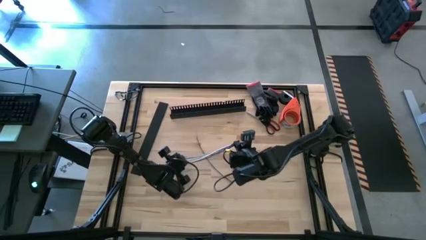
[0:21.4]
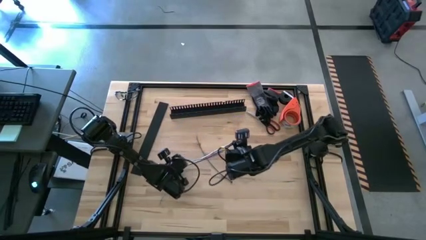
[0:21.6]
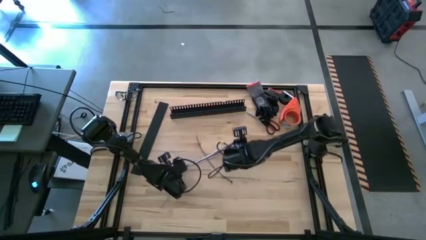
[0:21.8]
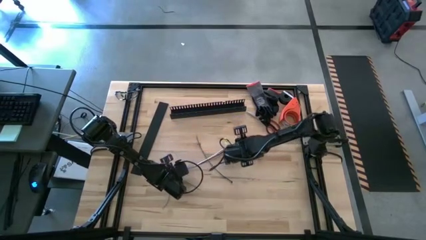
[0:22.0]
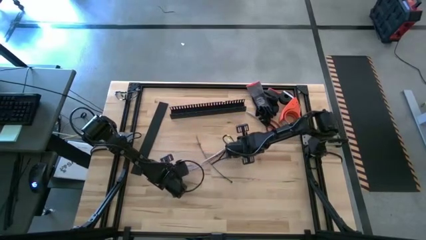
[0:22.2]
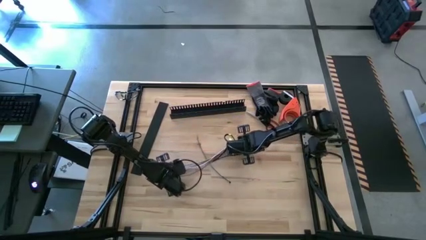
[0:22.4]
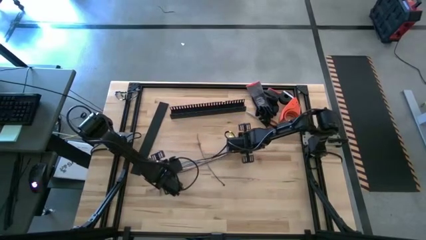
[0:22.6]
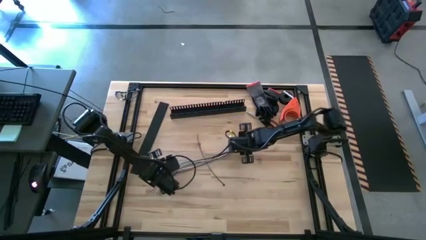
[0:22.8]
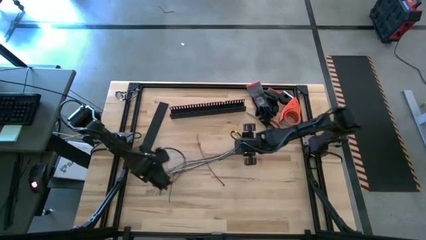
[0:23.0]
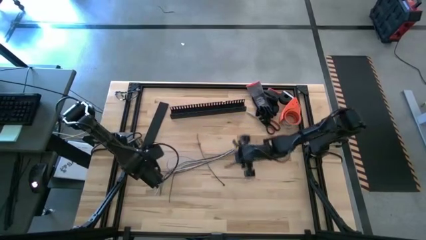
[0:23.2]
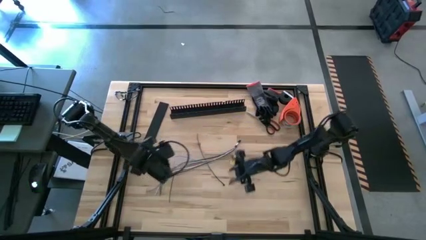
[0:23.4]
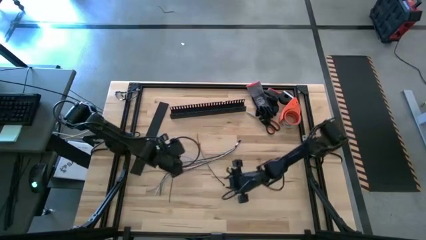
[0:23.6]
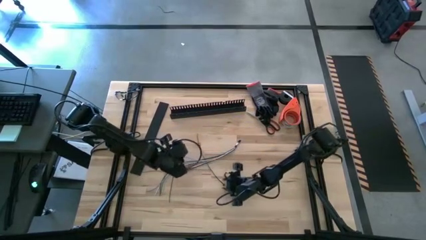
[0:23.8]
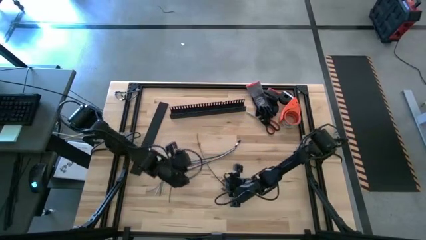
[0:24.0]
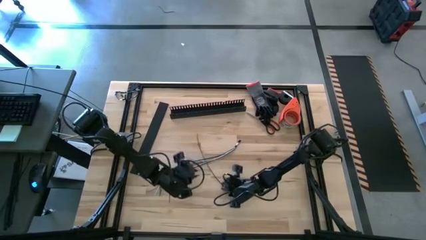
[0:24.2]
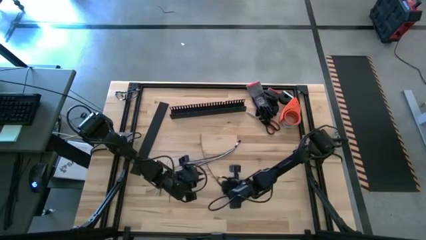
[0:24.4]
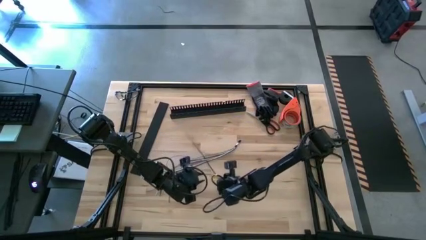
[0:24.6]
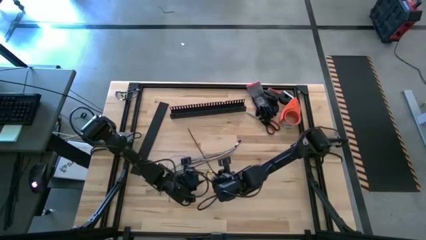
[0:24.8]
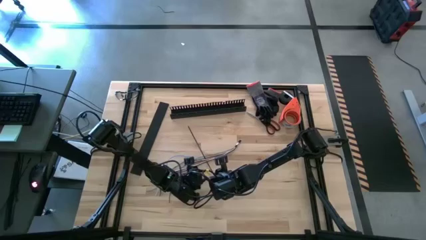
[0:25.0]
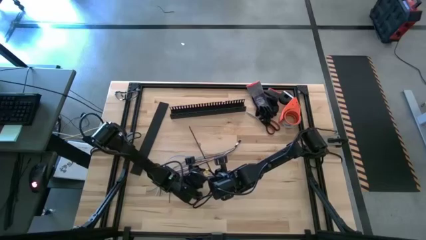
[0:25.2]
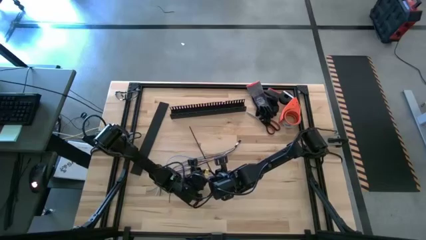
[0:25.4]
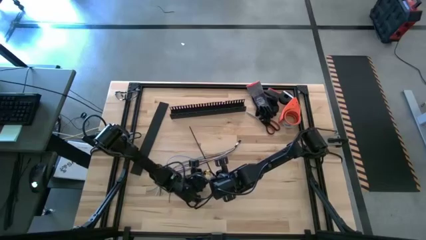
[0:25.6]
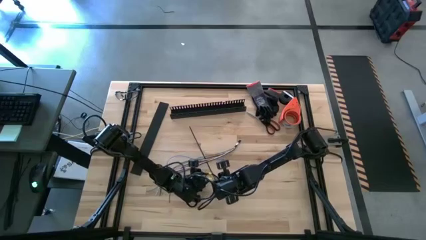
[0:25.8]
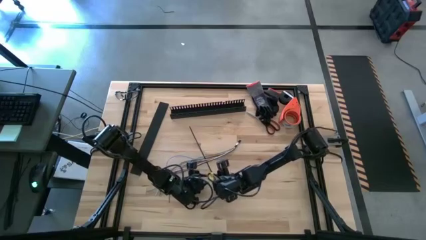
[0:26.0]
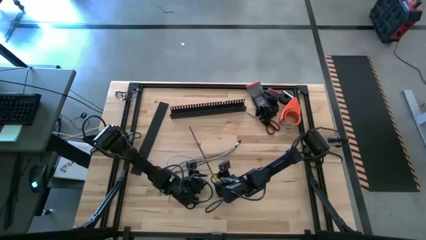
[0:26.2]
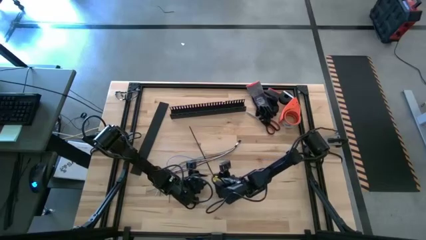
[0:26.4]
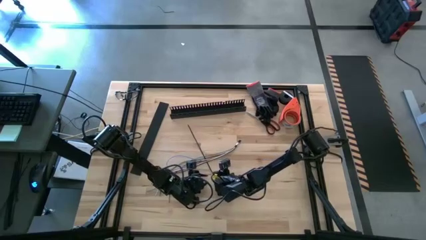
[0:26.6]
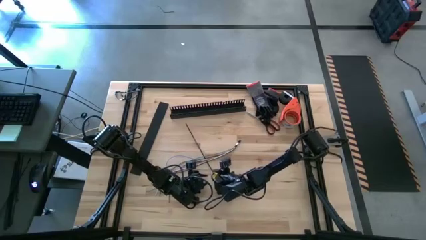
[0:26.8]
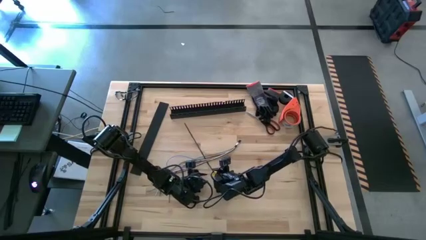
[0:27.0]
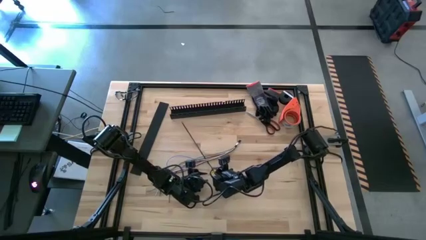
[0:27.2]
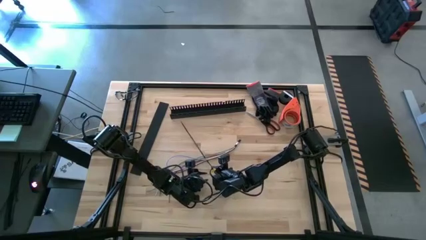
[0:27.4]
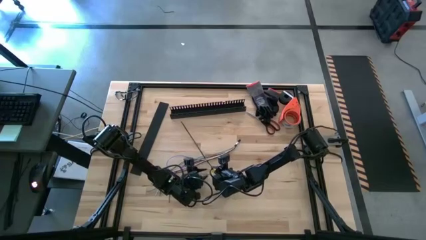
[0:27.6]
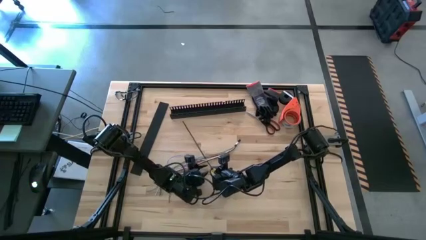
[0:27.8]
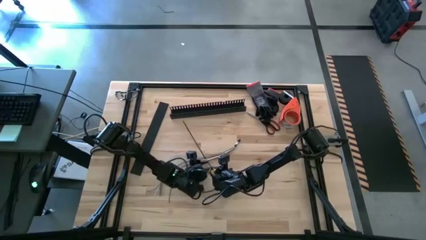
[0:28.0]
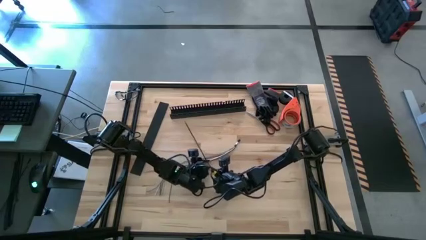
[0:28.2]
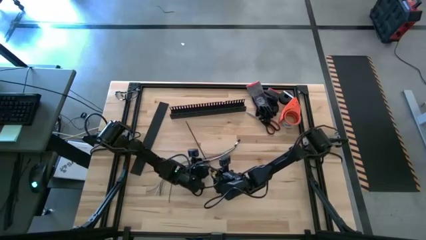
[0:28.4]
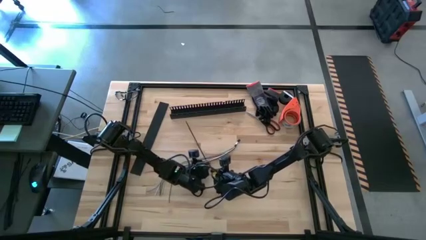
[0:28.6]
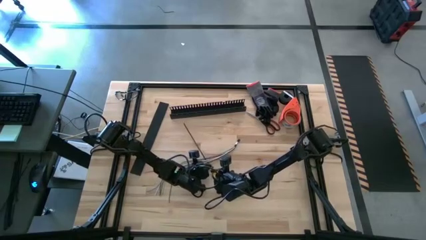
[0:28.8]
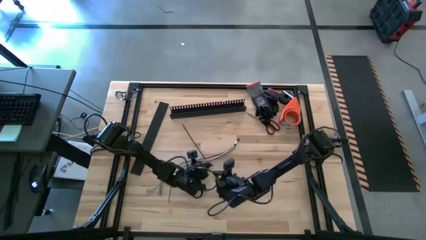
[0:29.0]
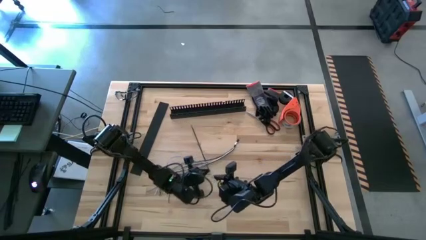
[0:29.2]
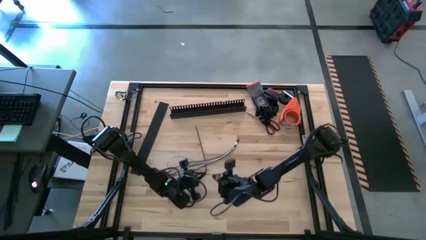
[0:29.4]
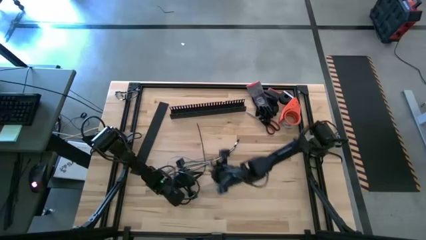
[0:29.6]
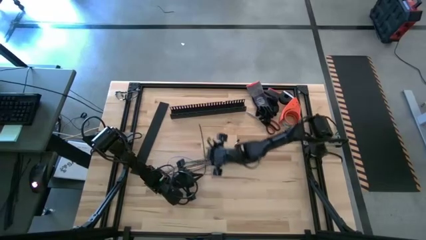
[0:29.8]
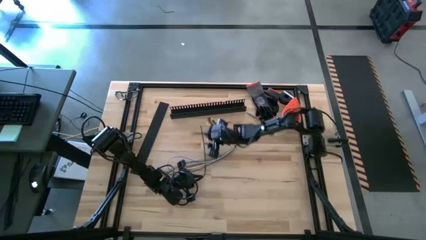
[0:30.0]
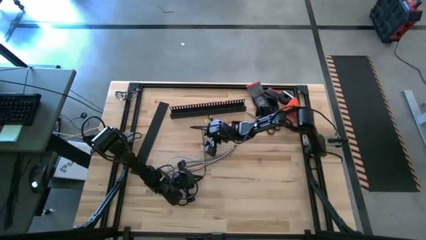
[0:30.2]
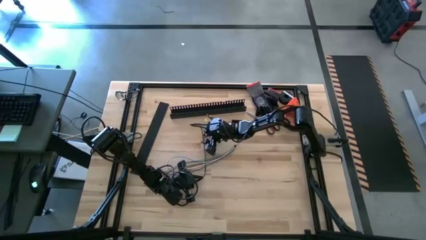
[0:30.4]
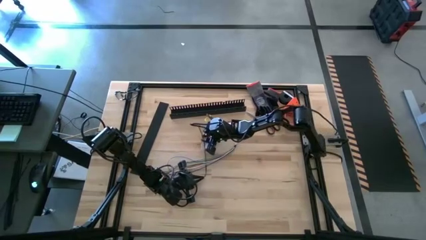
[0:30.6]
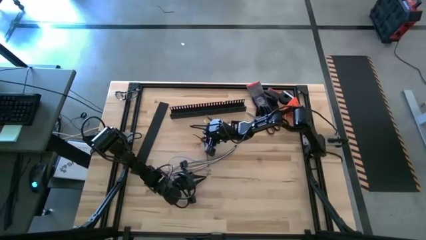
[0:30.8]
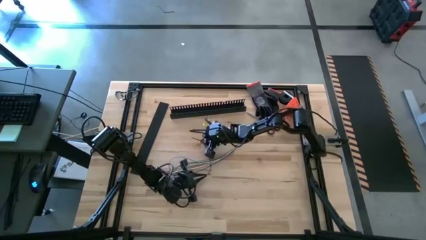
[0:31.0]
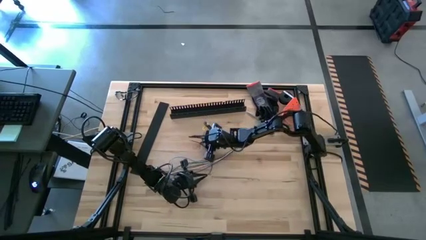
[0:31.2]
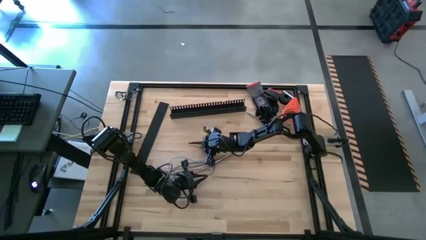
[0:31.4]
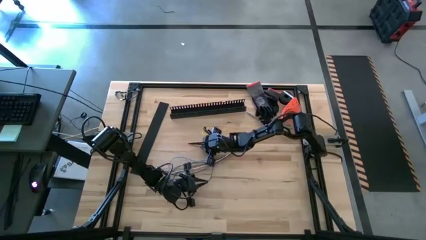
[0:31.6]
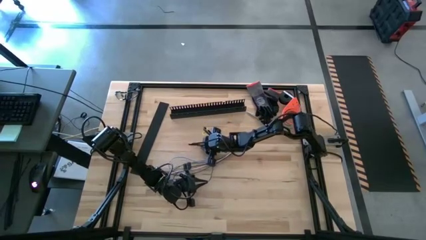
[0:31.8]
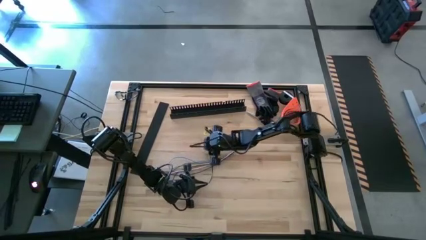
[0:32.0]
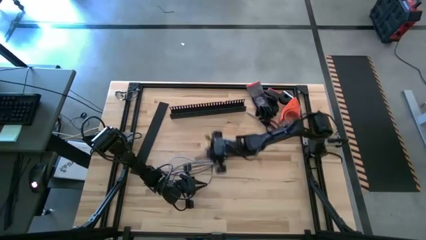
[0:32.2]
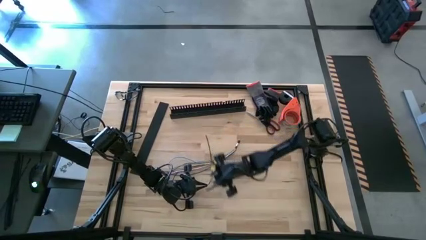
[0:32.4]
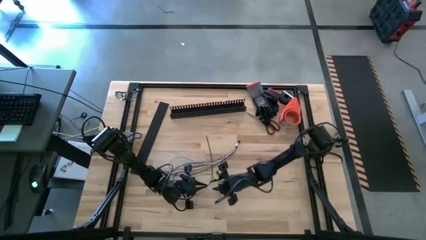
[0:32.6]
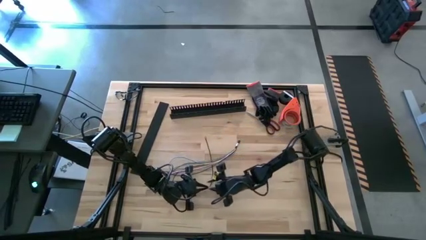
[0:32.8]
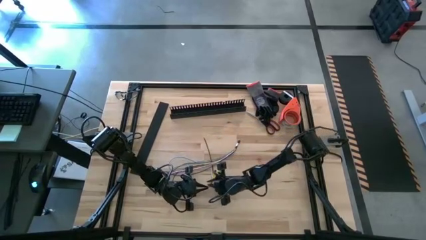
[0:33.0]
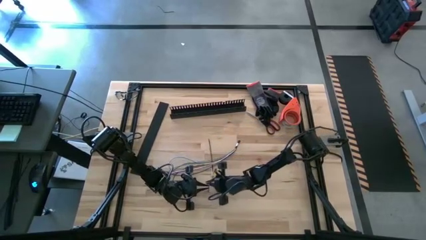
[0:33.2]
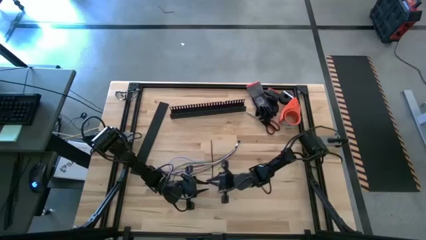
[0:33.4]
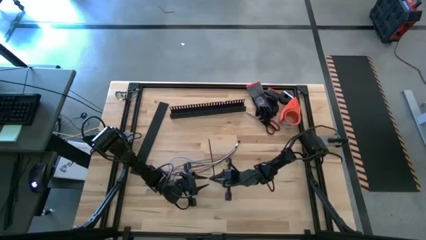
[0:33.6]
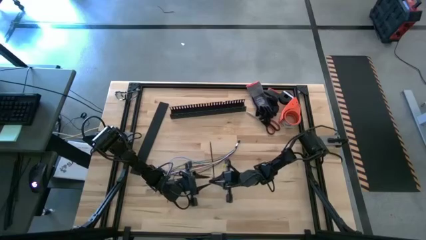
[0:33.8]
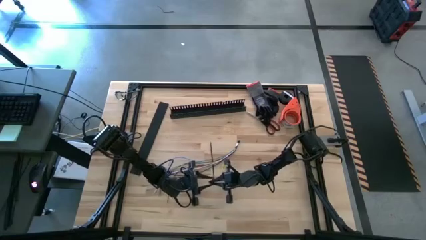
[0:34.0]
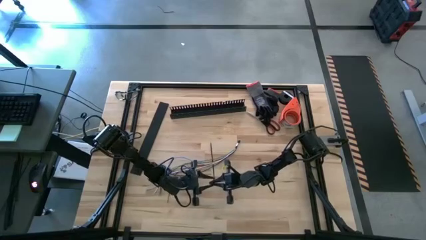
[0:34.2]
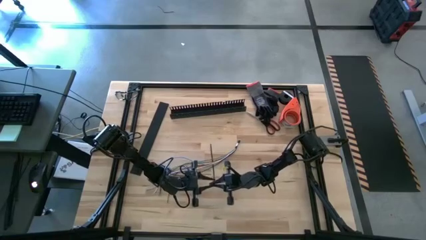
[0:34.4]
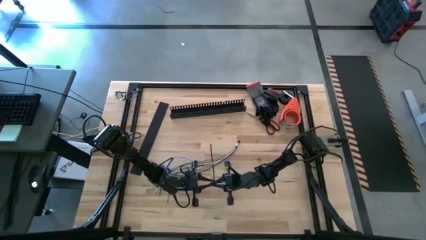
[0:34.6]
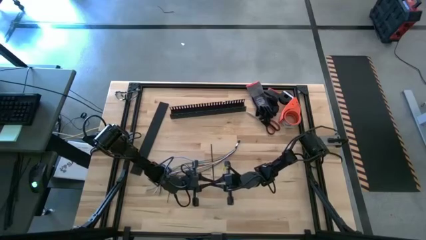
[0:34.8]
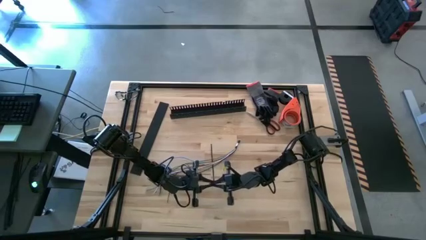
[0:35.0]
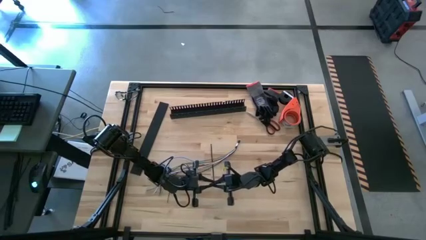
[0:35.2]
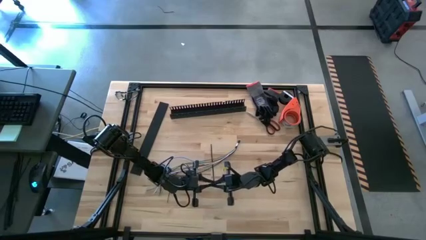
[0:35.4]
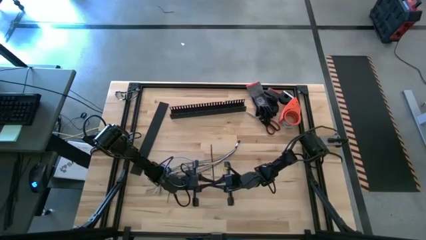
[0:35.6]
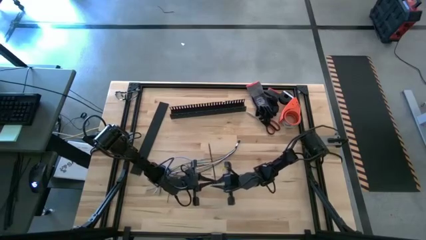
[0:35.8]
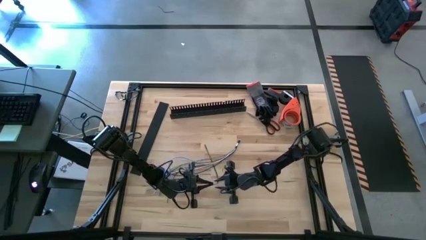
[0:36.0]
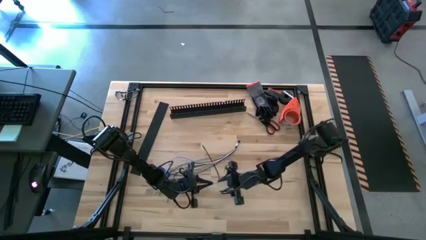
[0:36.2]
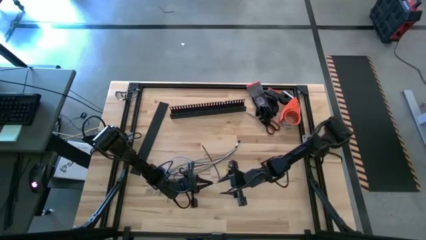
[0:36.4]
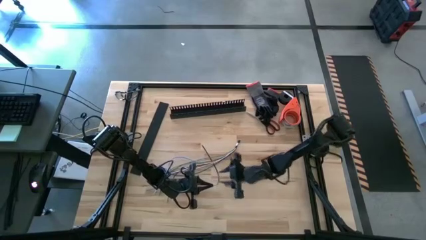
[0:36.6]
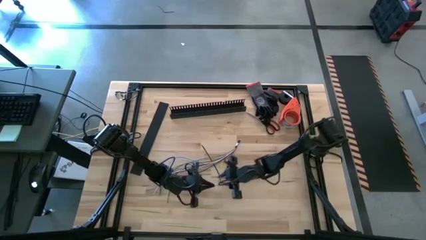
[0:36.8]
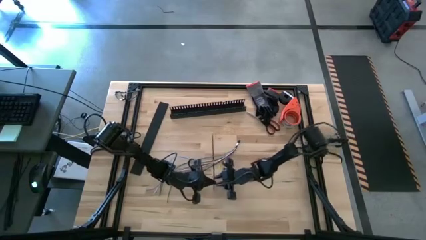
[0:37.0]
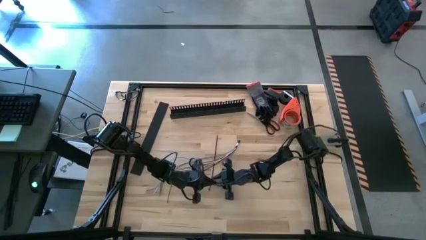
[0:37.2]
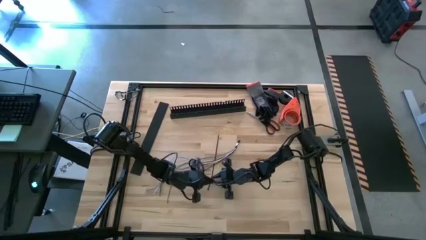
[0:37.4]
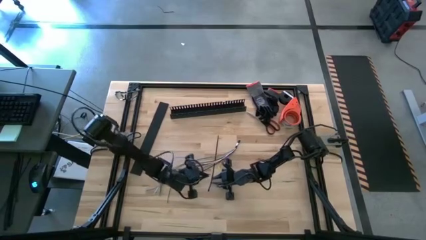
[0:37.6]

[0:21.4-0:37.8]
Task: Ziptie cables
Wrap the cables together using a black zip tie
